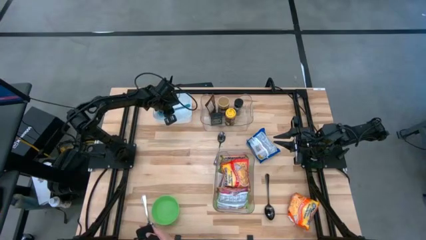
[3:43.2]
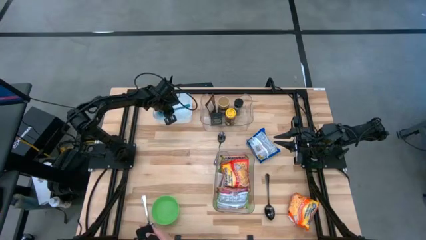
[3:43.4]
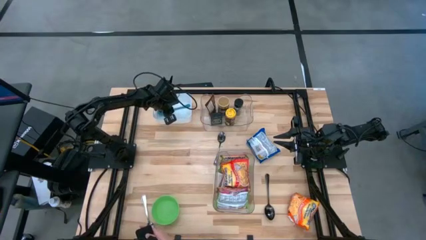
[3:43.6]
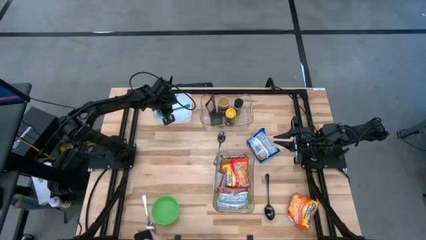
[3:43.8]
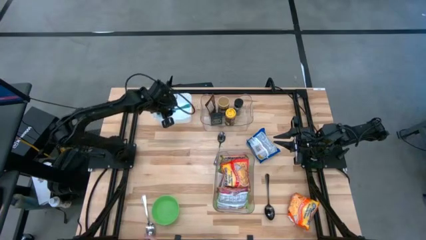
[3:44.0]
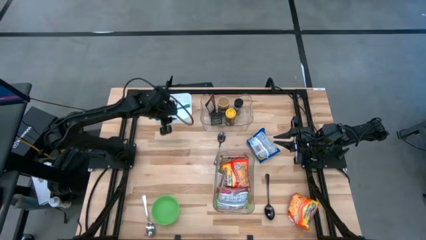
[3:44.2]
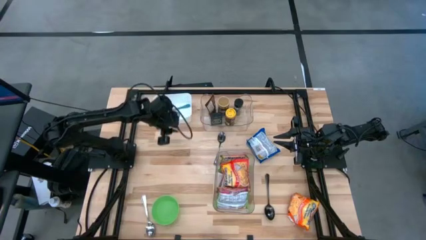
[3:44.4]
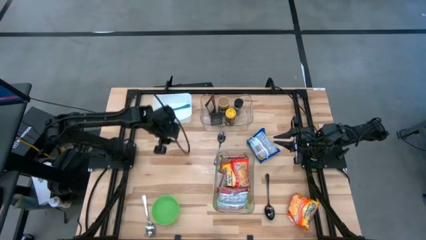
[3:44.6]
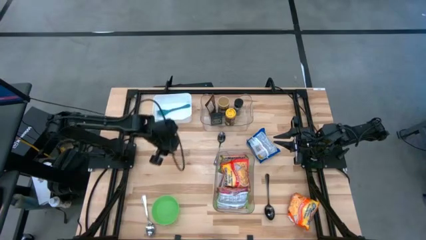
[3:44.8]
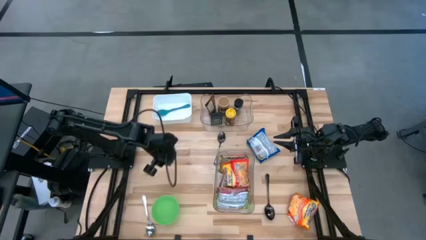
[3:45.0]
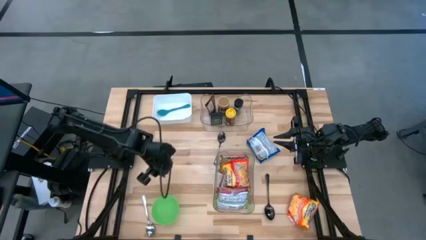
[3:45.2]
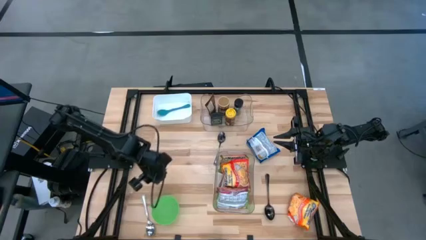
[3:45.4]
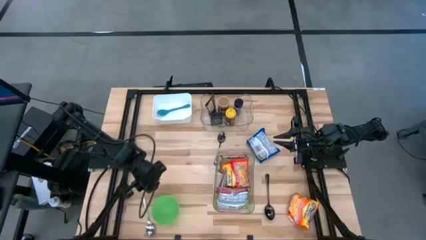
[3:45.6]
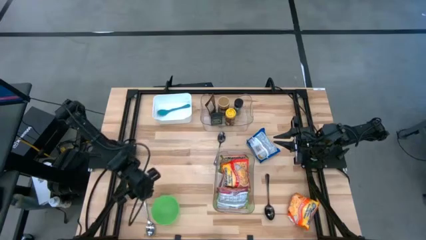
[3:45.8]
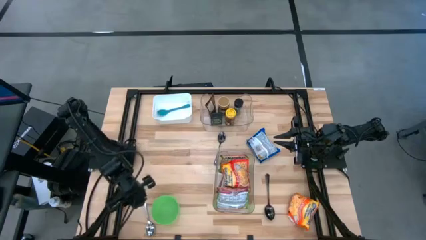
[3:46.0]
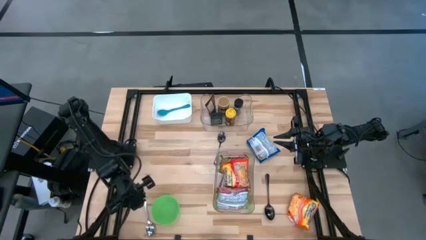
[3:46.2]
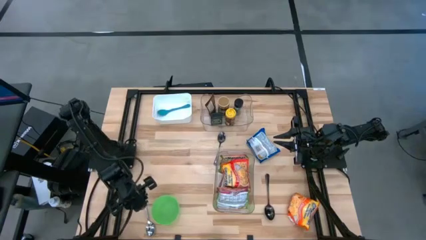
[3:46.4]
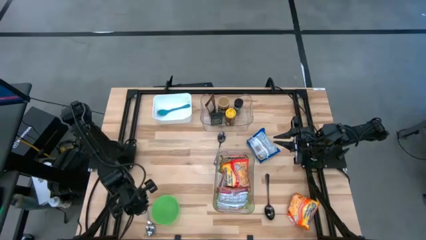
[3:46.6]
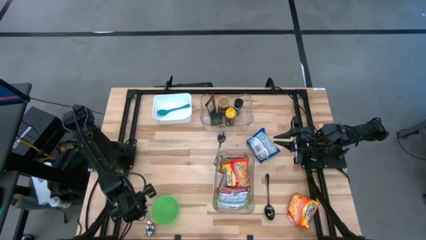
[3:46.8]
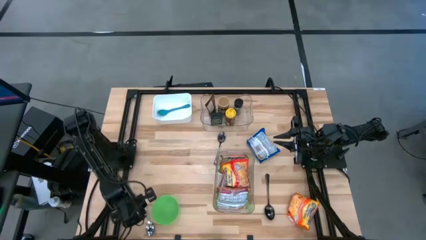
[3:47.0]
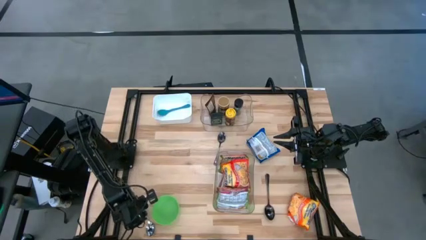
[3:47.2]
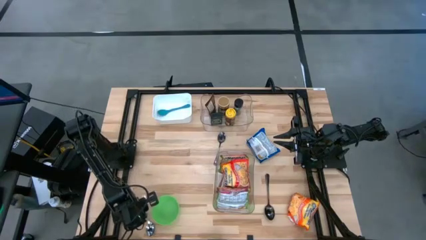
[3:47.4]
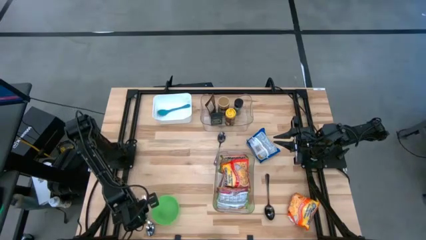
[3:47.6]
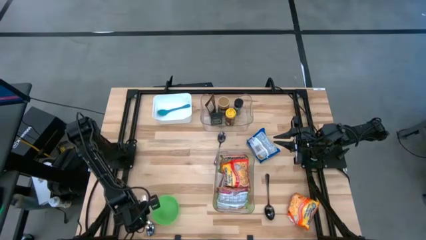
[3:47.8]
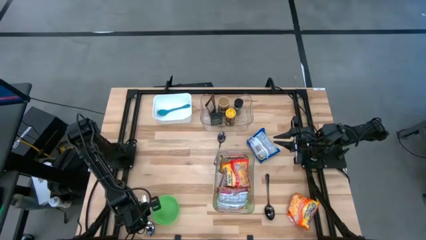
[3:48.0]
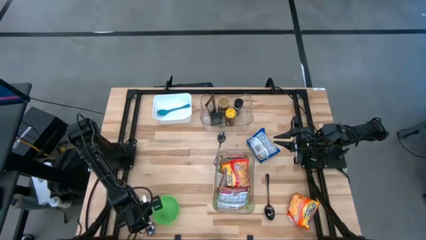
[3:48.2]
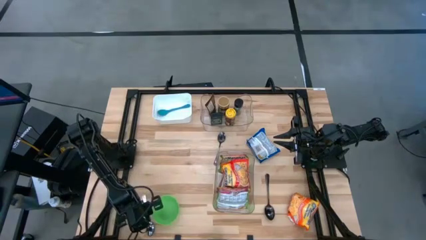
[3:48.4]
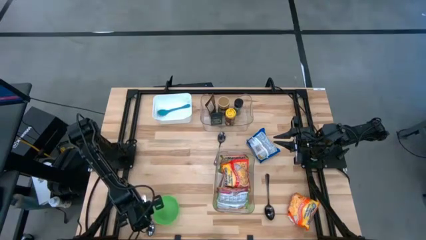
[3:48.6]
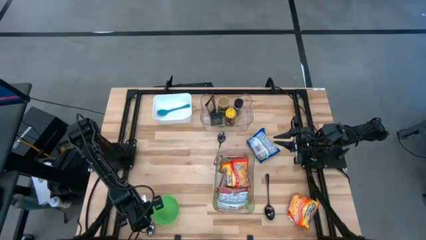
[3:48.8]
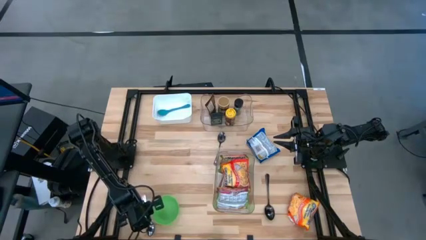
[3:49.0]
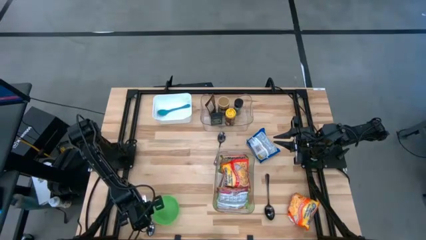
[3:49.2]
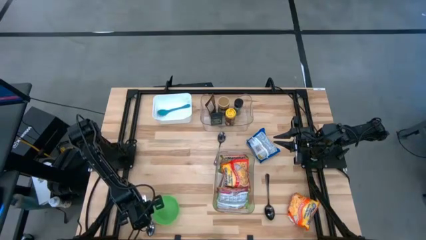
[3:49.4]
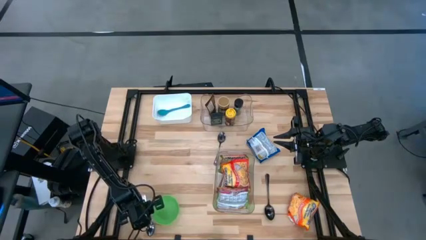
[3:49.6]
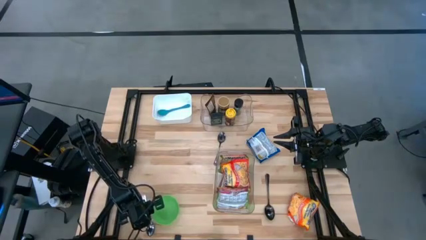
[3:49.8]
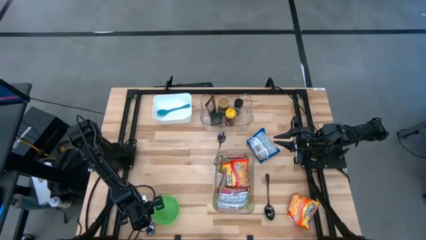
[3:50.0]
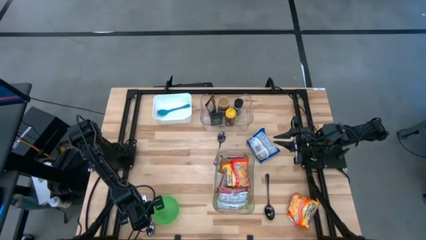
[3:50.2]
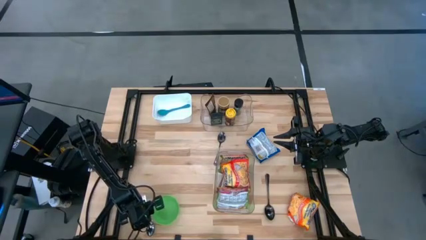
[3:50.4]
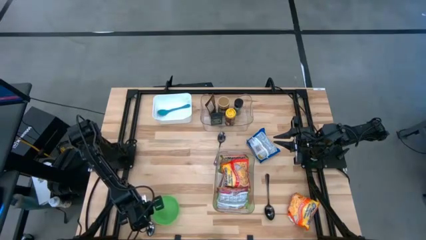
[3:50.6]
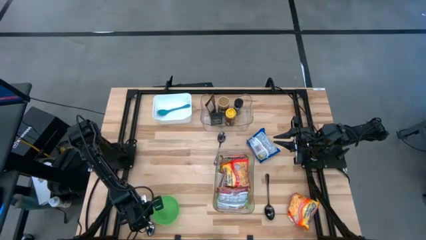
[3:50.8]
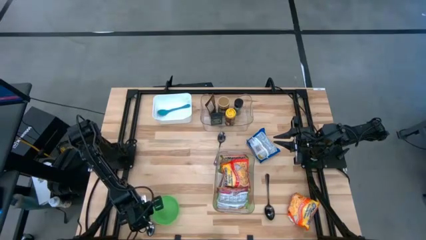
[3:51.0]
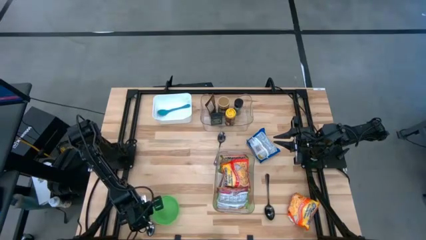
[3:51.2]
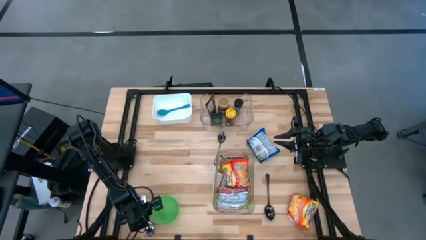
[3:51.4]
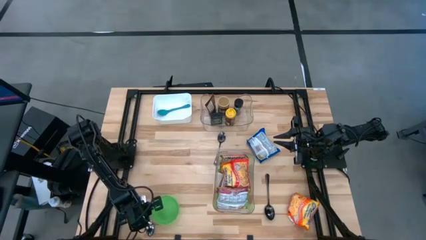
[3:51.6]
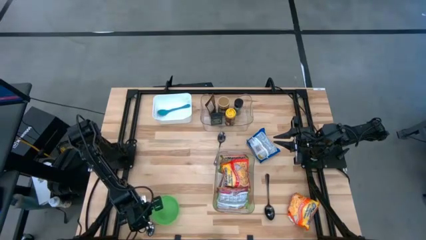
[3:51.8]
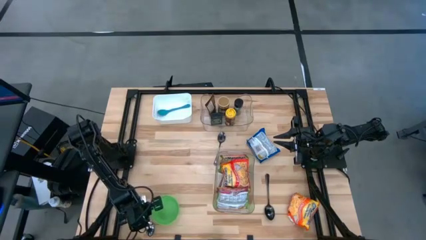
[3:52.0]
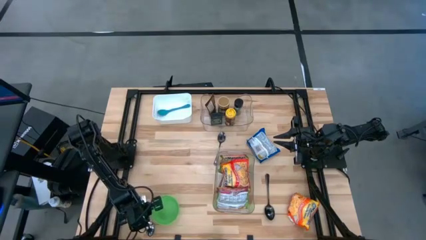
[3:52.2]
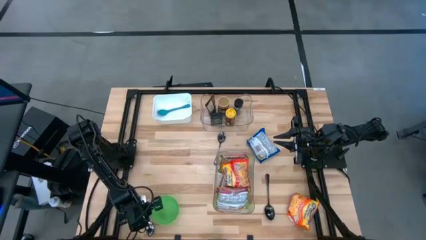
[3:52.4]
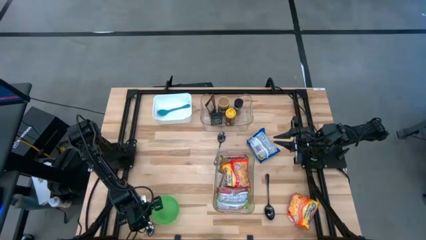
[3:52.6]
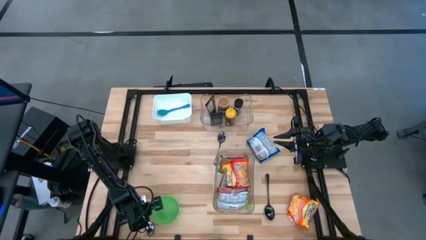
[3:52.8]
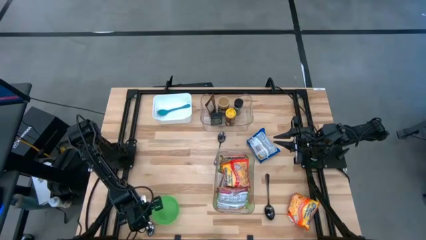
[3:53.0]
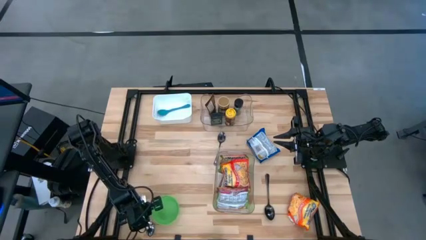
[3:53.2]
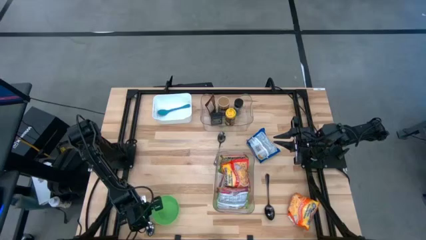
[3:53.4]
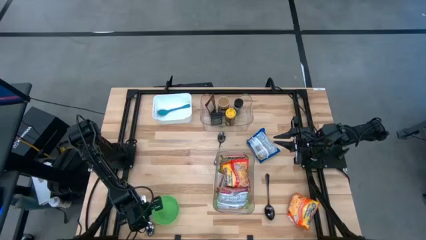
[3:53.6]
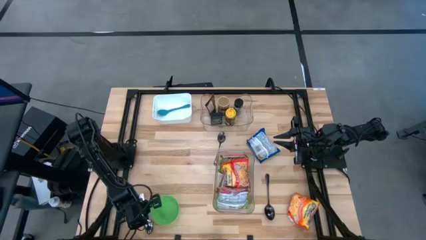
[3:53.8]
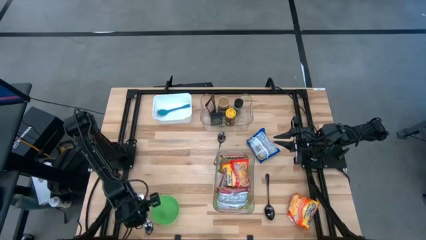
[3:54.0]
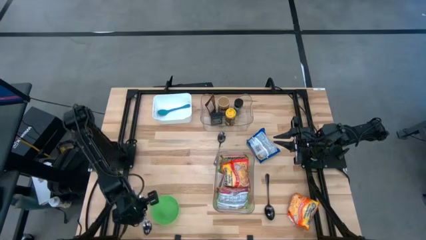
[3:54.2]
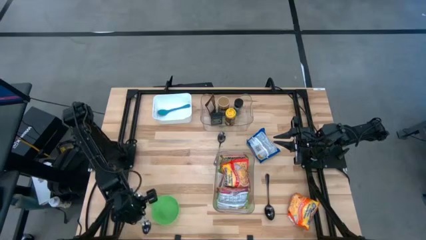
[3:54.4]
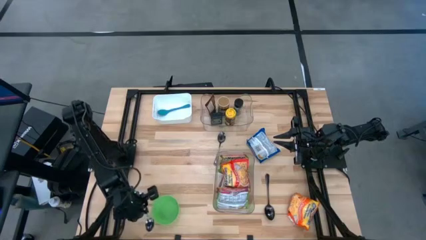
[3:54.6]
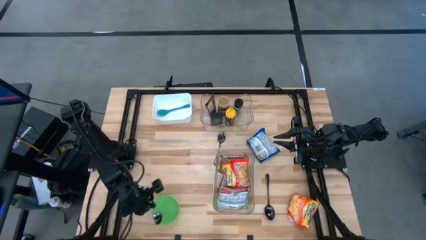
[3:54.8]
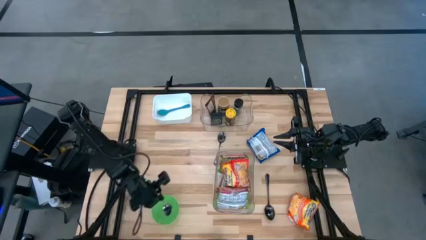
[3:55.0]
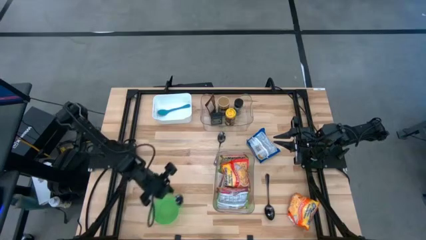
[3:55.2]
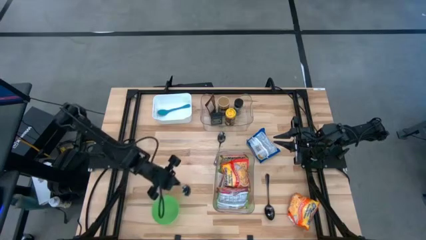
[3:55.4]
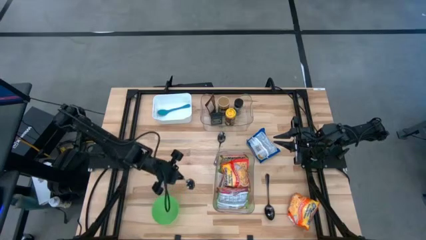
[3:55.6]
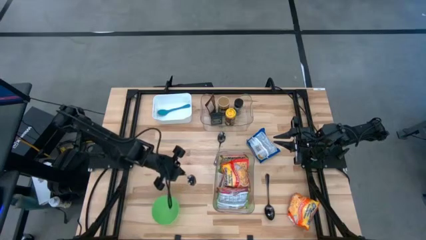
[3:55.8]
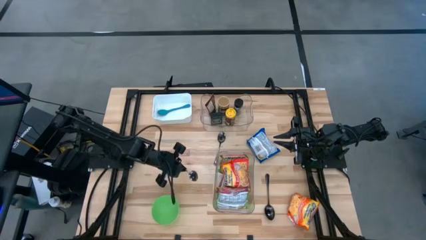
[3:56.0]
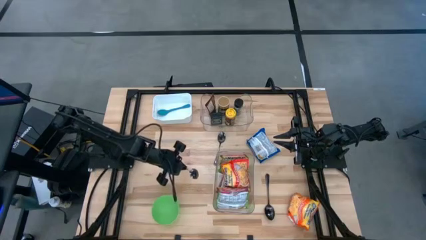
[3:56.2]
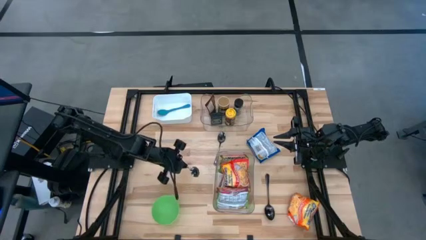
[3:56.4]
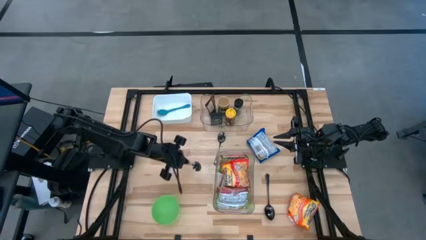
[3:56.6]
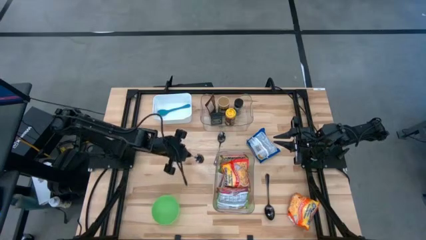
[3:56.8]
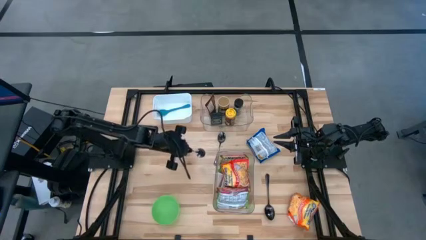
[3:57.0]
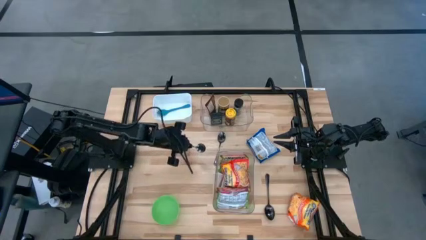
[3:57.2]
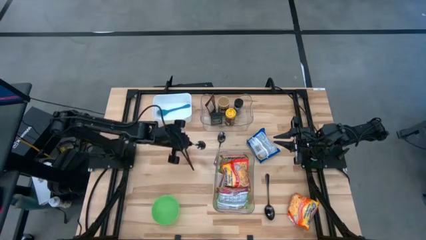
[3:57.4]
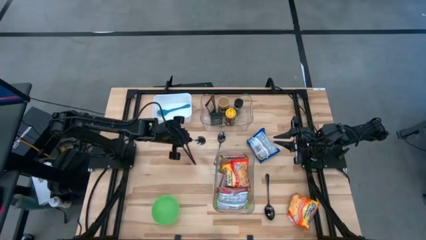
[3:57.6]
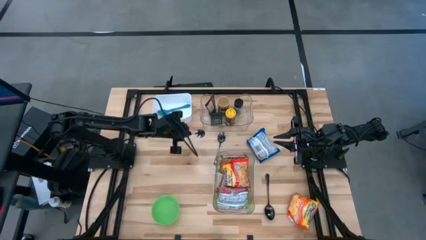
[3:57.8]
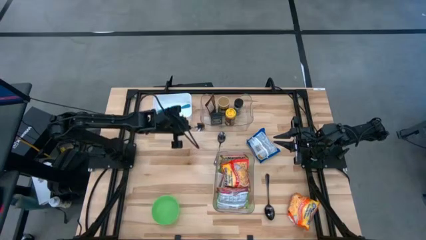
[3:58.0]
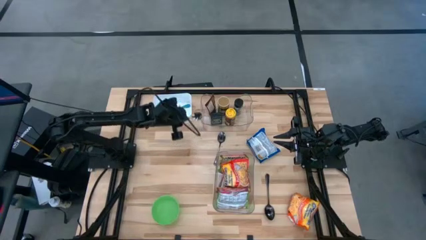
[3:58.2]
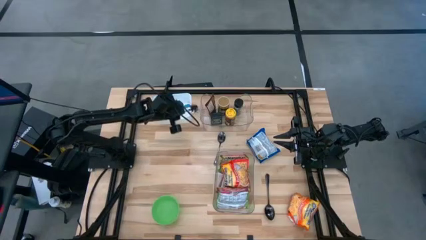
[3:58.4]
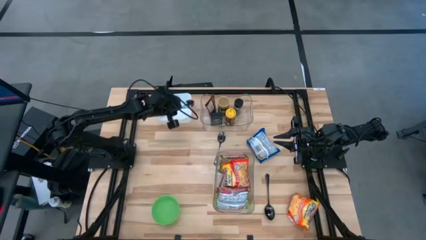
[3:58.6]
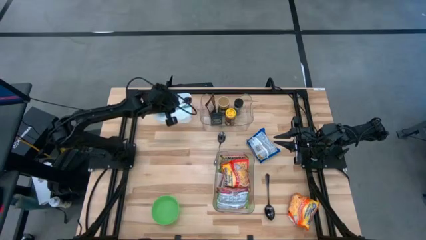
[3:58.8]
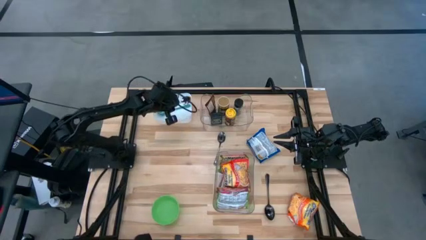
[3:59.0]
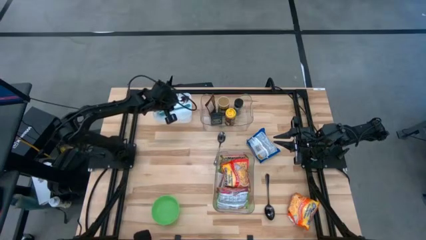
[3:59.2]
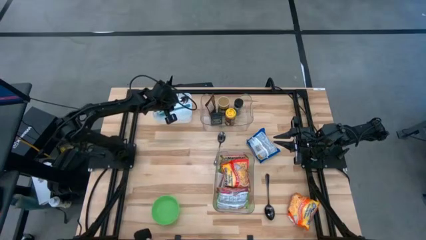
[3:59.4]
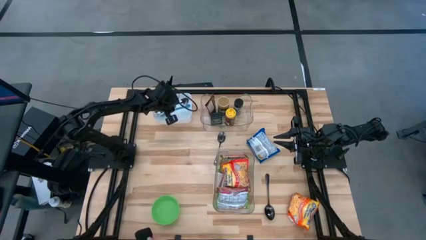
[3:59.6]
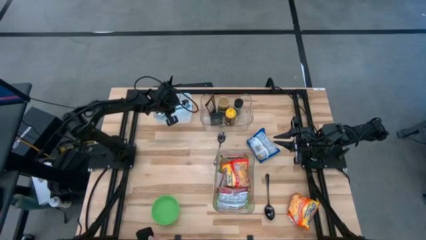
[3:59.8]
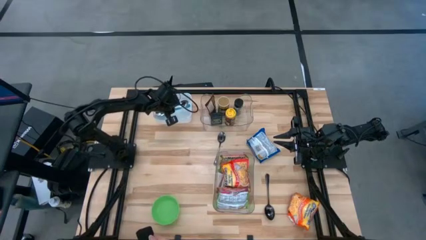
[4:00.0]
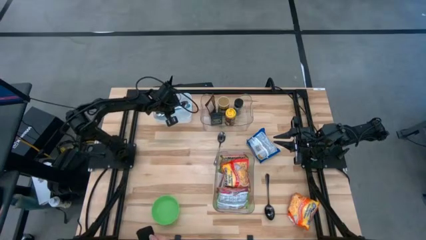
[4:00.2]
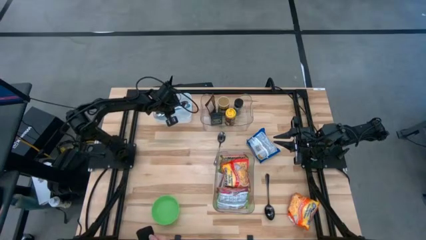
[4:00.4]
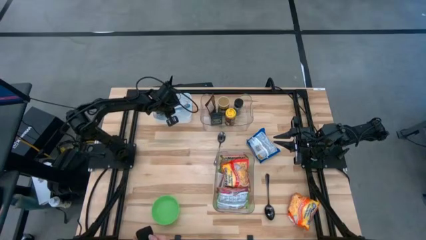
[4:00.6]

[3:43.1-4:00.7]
Task: Pick & Place Food Item
Put the silver spoon into the white bin
